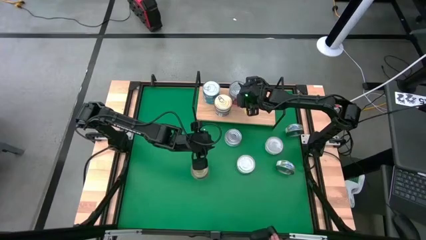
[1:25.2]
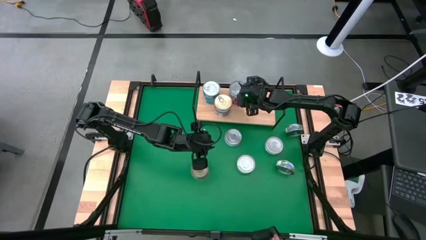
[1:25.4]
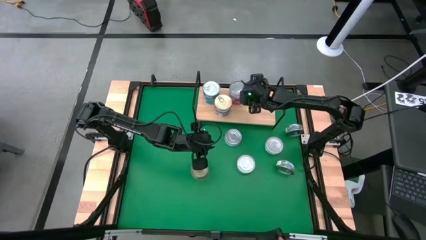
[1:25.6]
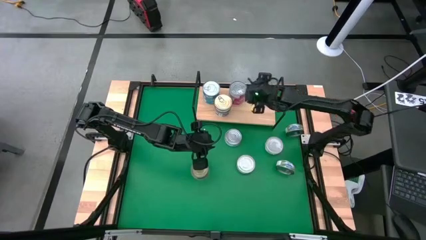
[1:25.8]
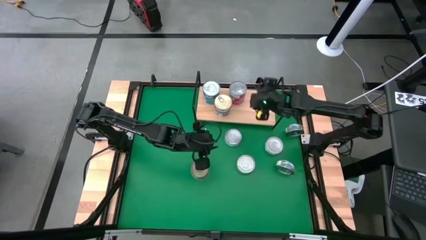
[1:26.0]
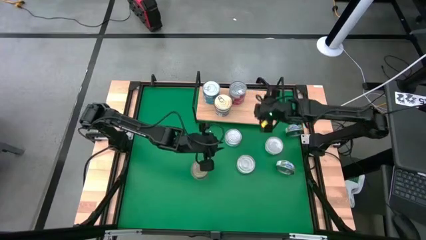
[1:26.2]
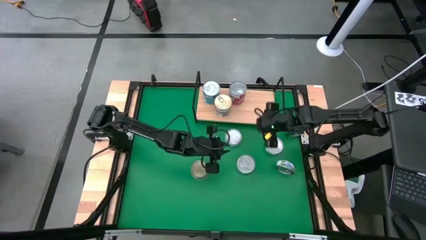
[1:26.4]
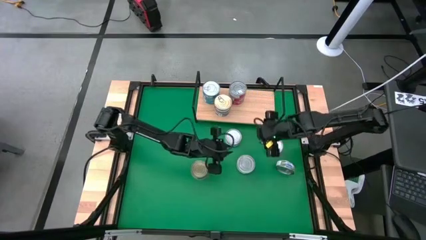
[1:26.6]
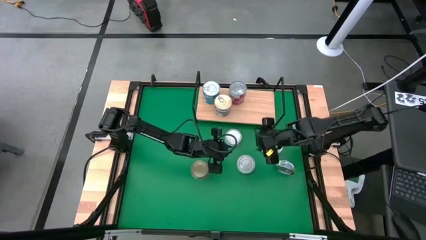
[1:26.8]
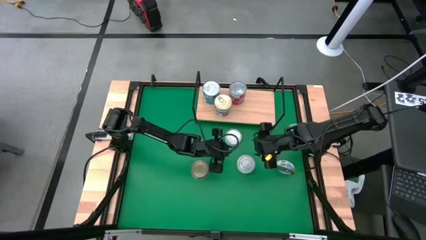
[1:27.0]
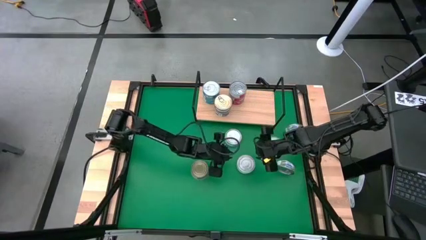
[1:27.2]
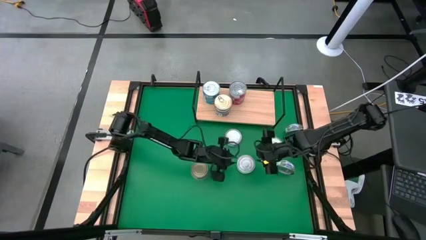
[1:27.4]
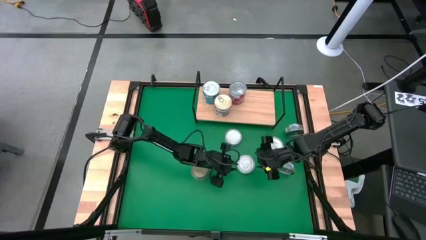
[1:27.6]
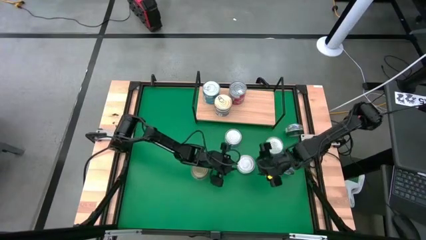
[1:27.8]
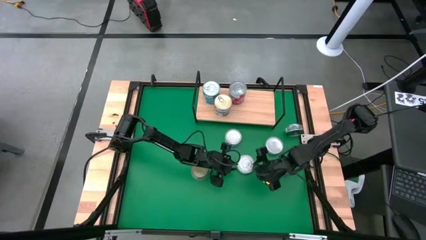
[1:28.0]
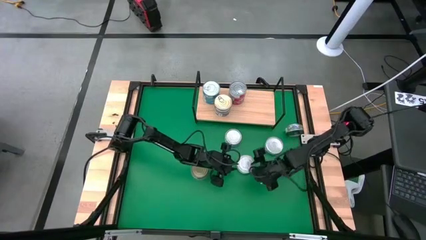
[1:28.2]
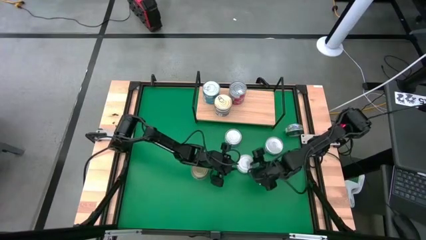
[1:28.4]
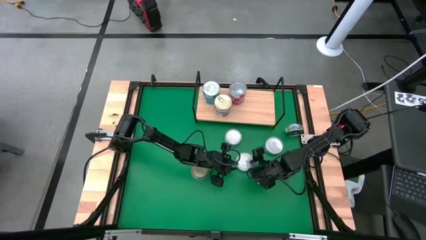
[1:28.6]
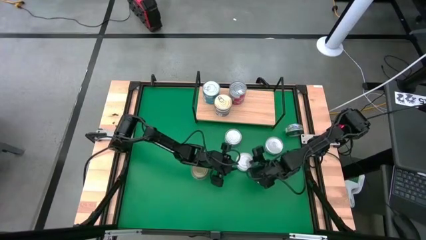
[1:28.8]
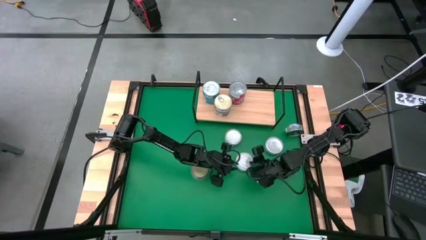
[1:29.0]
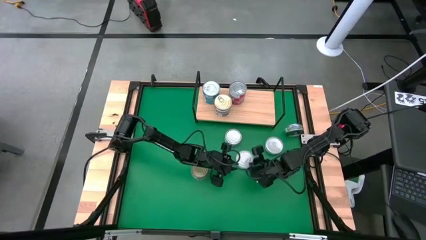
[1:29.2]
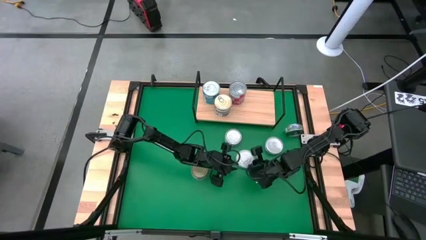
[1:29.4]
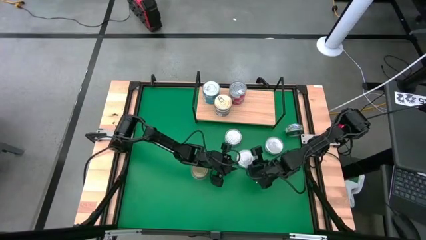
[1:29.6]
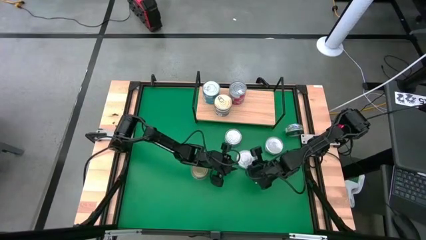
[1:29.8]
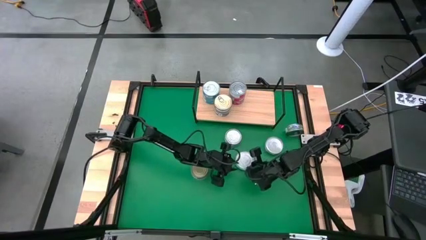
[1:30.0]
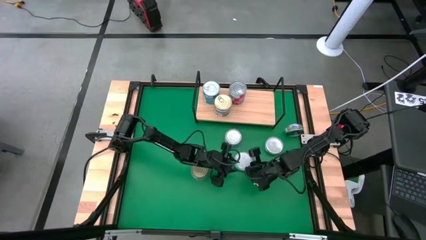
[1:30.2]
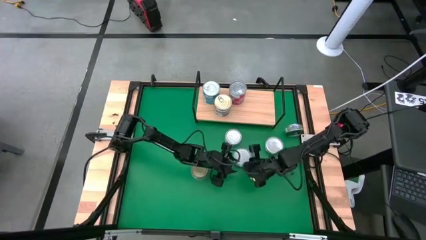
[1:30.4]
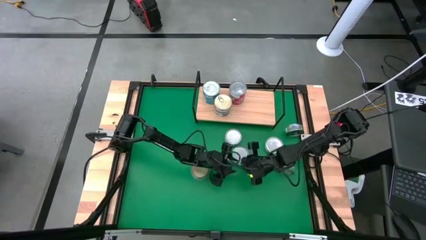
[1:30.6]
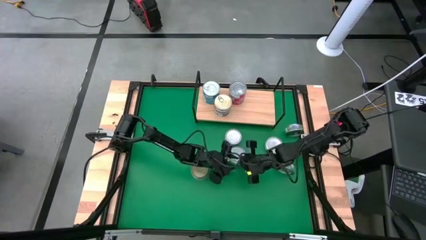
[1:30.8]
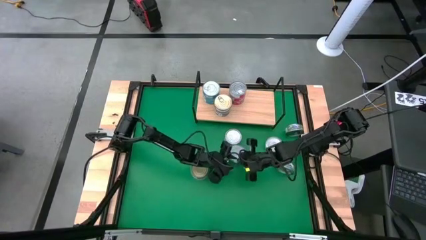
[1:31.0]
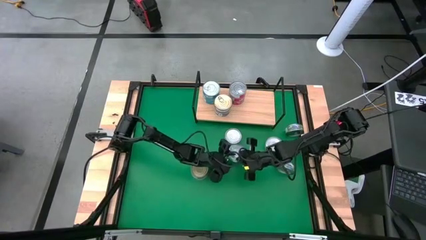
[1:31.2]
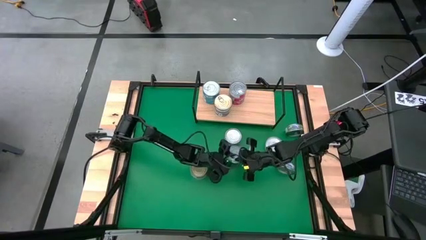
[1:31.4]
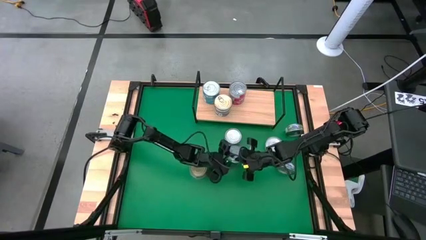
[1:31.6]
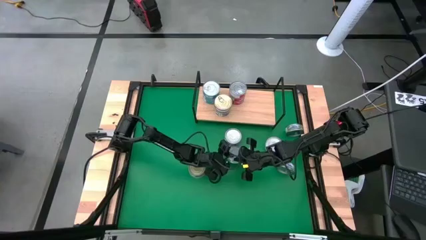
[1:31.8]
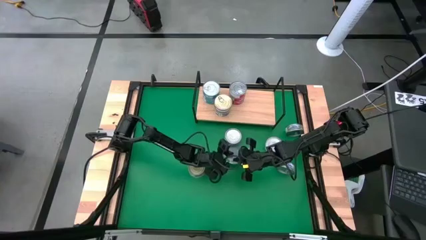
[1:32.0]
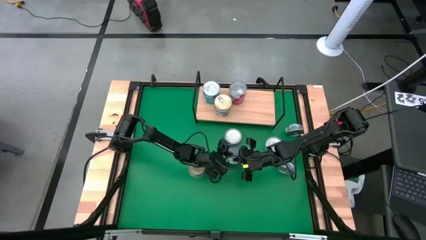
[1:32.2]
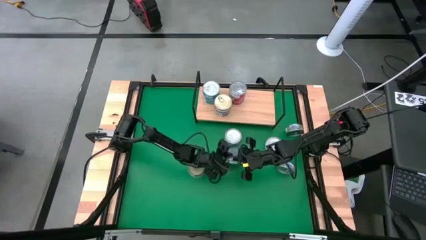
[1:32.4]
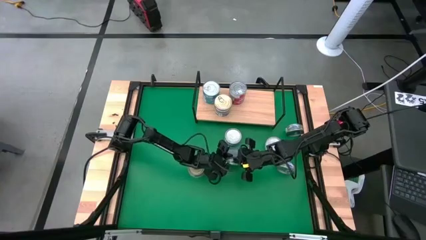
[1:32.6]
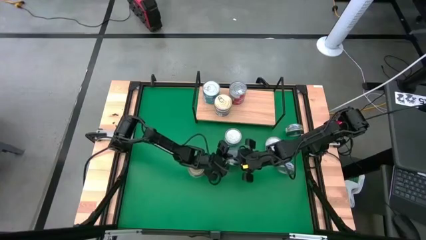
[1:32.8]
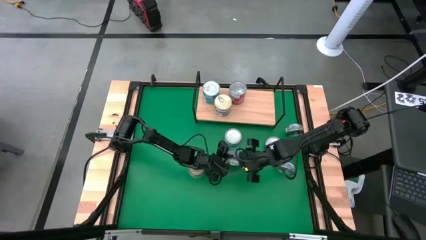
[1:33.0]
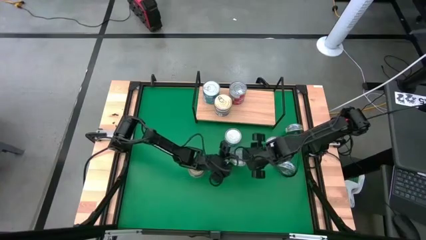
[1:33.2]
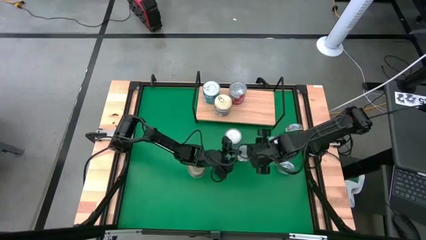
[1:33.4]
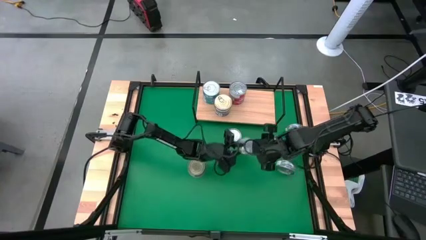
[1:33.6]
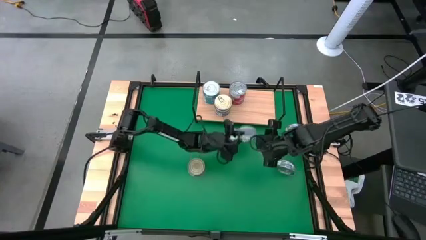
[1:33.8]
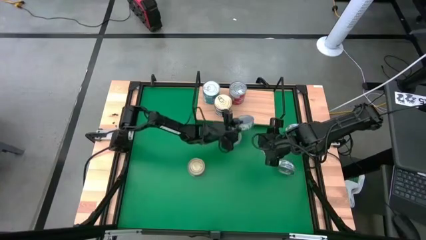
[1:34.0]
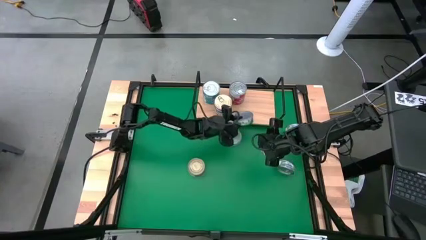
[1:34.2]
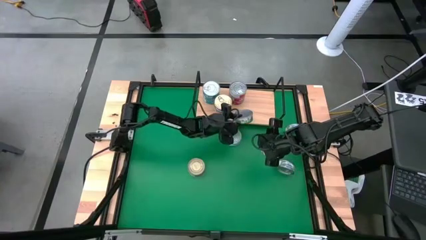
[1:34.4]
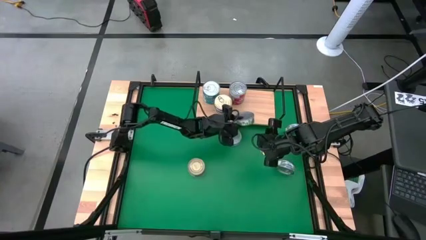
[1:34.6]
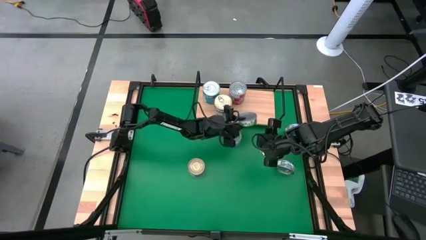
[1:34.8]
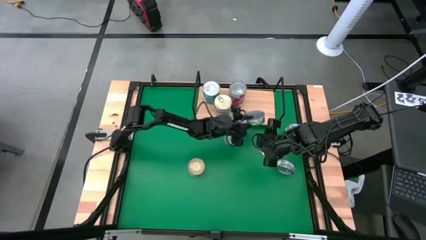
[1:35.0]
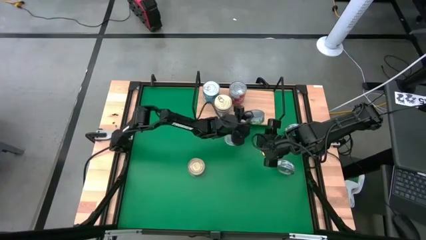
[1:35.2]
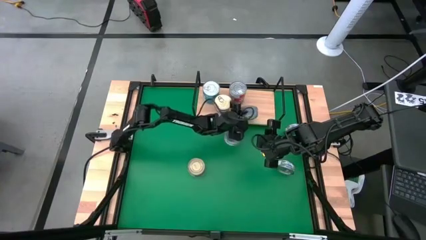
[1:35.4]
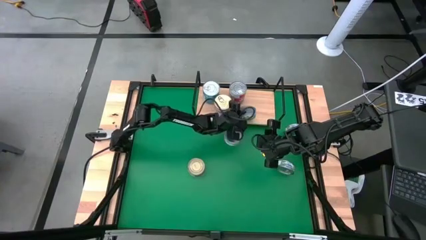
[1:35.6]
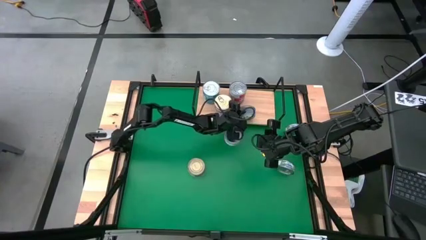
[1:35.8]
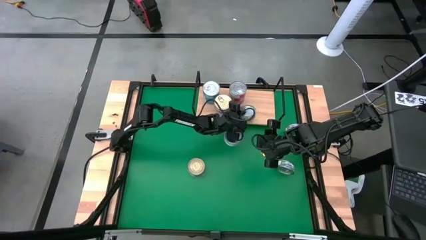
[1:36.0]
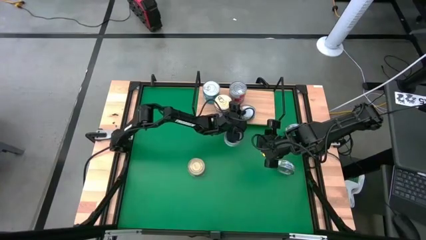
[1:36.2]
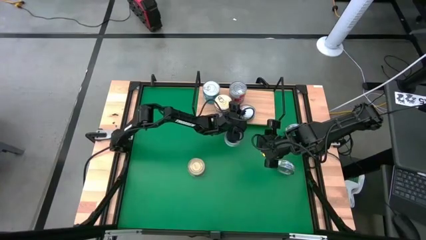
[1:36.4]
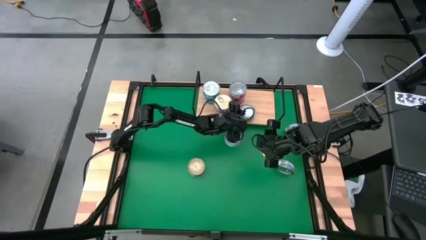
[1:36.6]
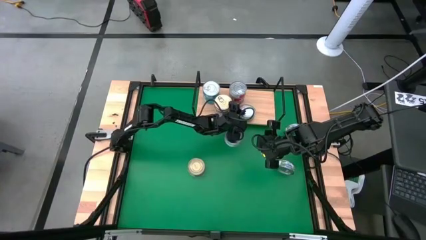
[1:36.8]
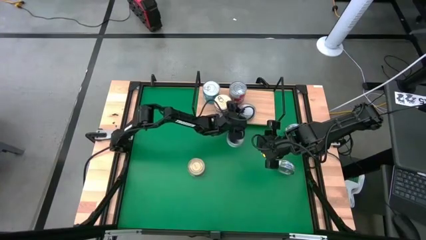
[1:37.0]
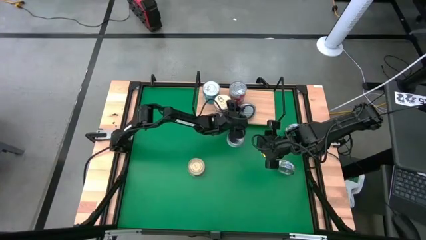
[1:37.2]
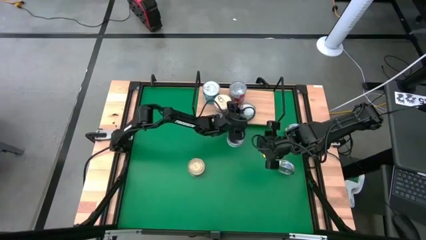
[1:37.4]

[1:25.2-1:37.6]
Task: Stack canned seafood by type on shelf
Put the green white tuna can on the shelf

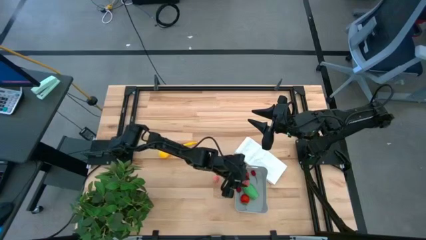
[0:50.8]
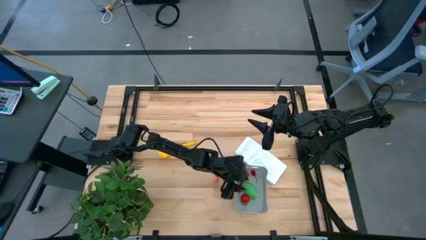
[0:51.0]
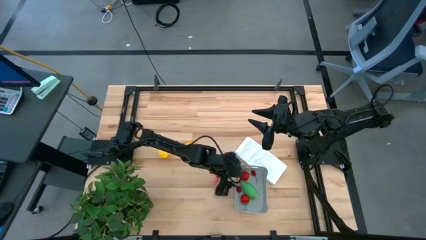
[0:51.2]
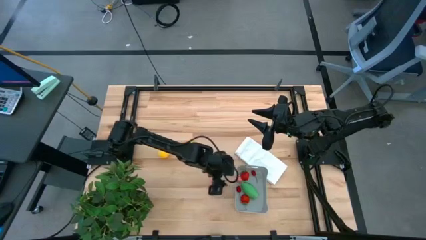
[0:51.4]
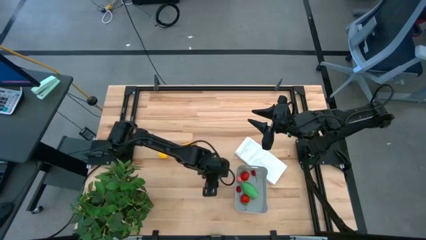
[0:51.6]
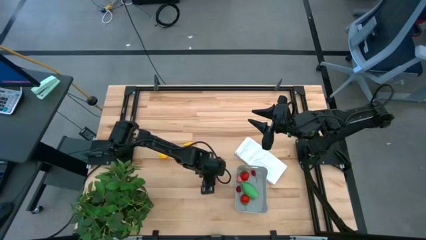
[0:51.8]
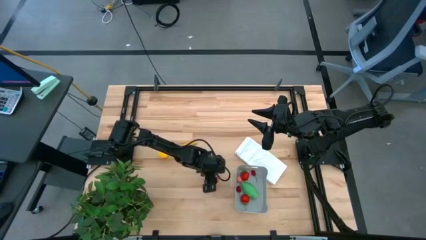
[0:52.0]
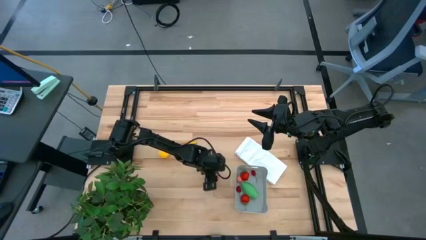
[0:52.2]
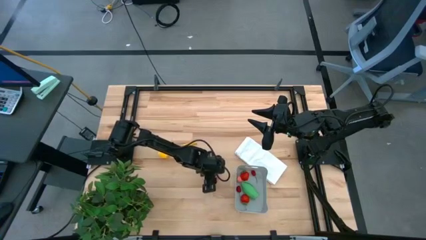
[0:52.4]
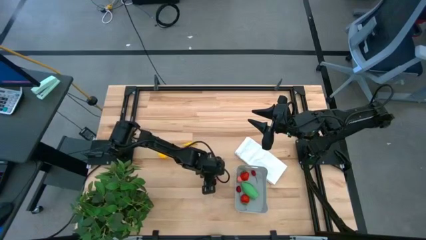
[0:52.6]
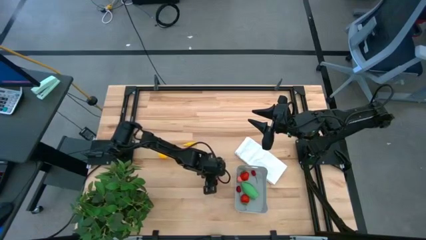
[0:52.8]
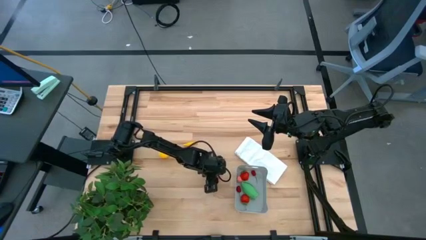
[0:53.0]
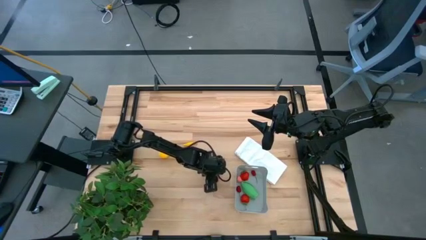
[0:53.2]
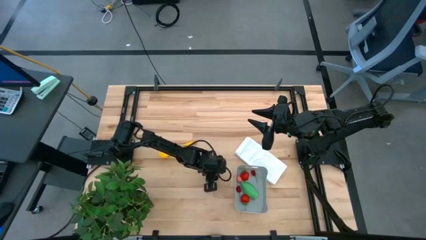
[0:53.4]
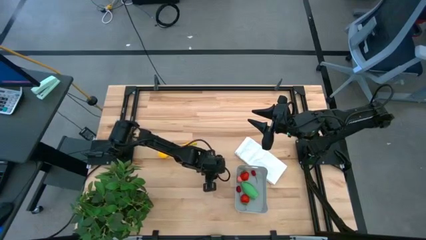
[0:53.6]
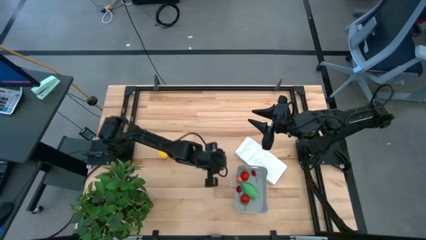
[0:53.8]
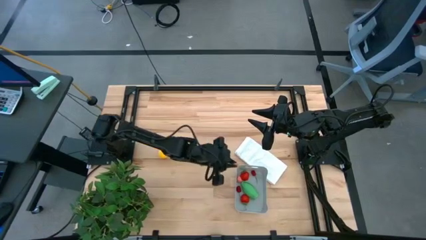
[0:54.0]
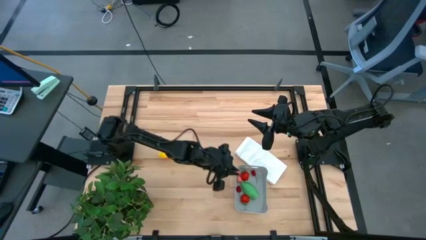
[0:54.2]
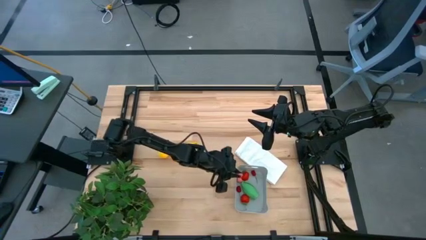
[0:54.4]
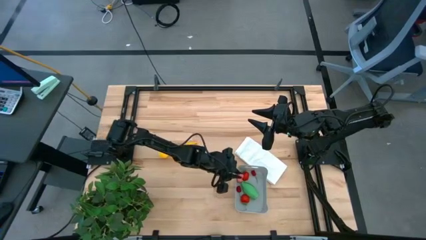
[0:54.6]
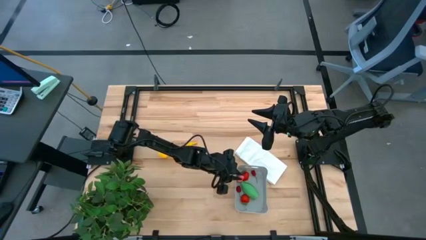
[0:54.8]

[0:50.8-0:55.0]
Task: Pick and placing Produce into tupperware
Put the pink peach into the gray bin
